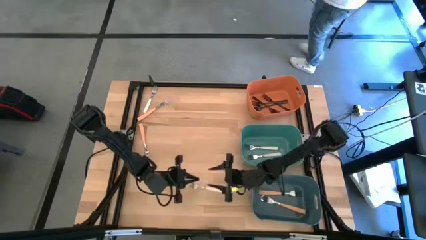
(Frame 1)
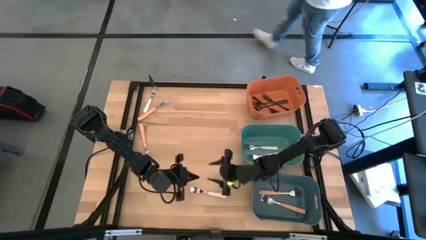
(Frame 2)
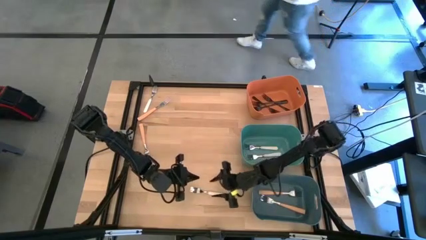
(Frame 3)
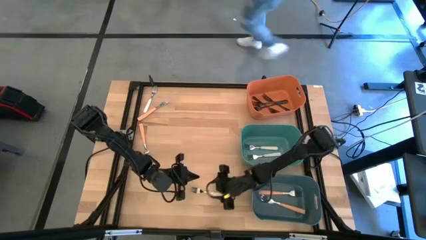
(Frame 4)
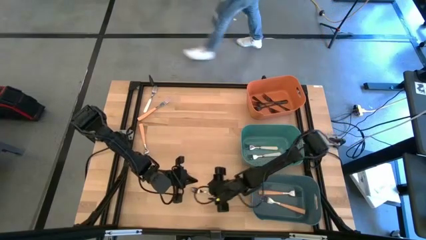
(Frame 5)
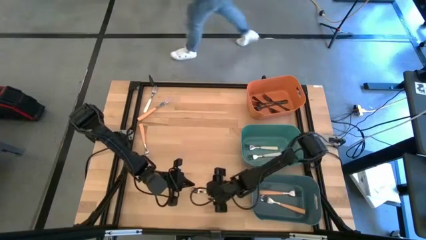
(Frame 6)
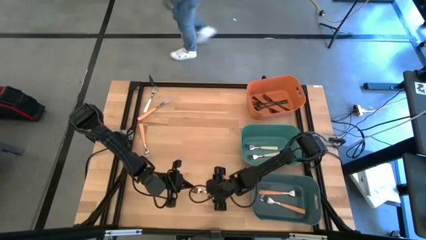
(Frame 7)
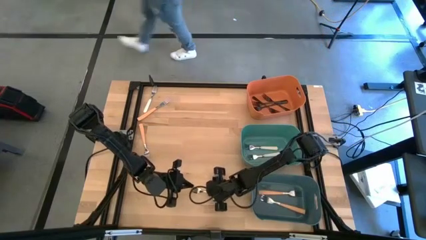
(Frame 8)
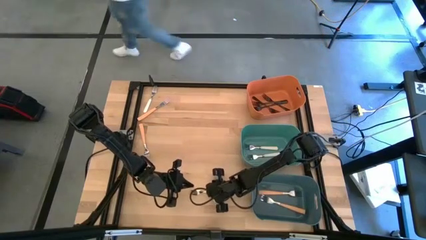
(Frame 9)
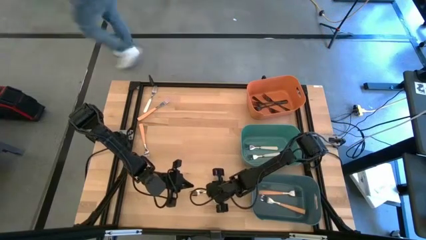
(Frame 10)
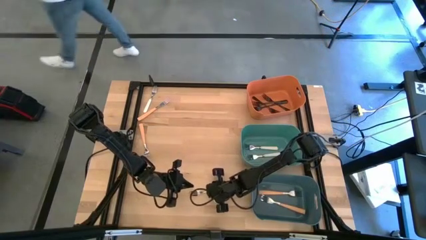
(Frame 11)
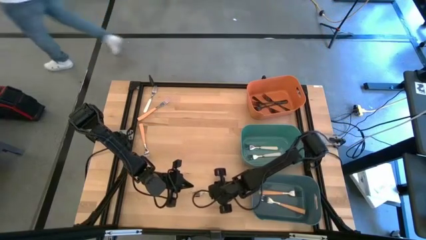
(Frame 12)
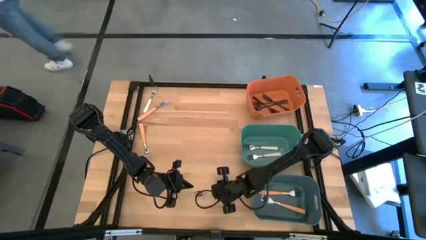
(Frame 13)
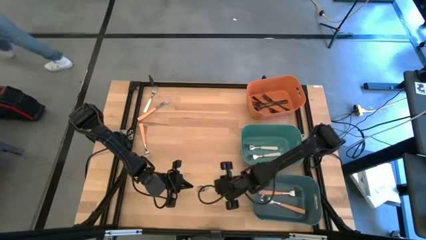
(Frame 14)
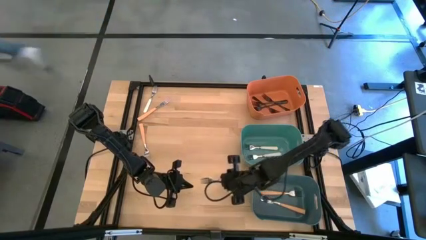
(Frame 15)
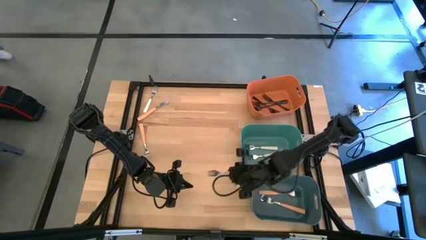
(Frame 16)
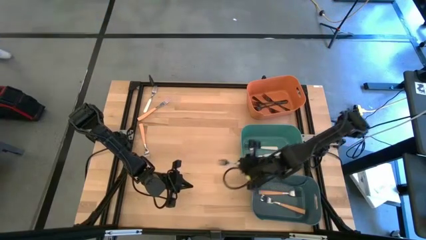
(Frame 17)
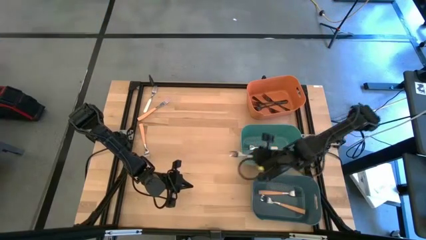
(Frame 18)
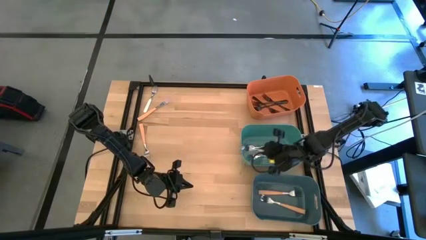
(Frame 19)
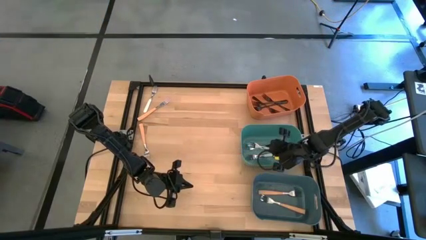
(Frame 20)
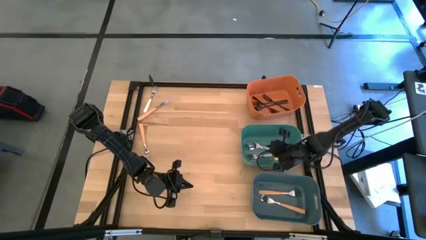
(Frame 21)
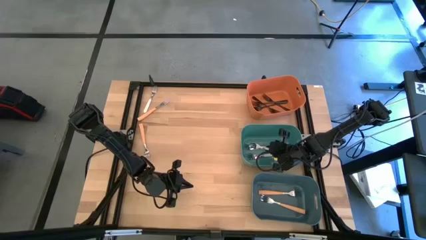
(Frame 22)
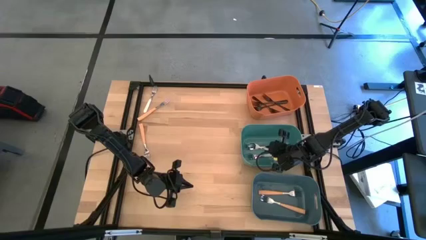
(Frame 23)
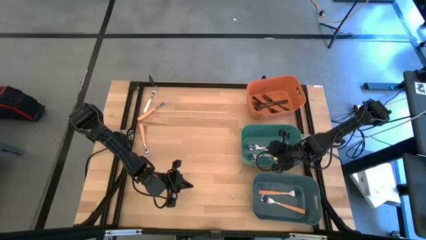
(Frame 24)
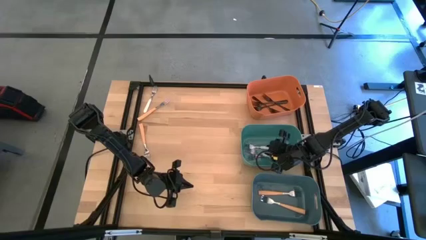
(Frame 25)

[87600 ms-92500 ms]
Task: Sort silverware by color (type)
Put the white fork into the green bin

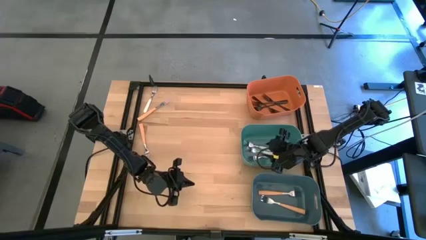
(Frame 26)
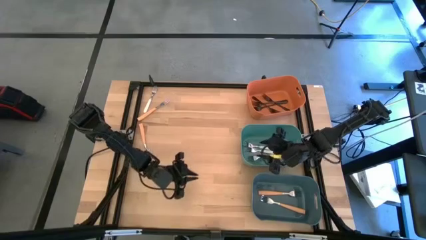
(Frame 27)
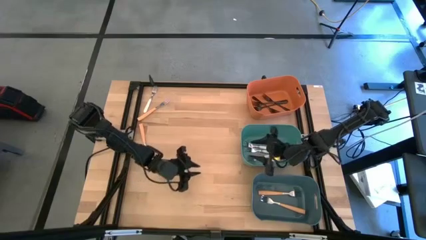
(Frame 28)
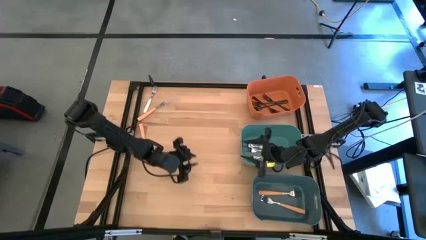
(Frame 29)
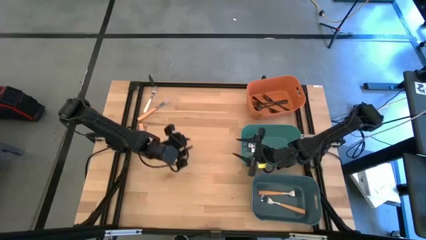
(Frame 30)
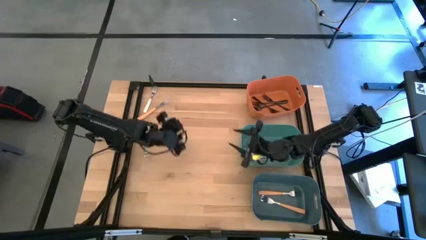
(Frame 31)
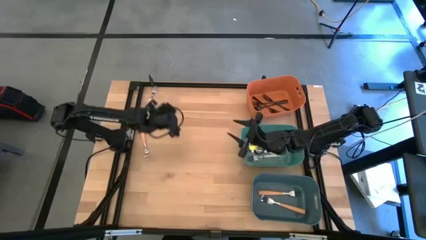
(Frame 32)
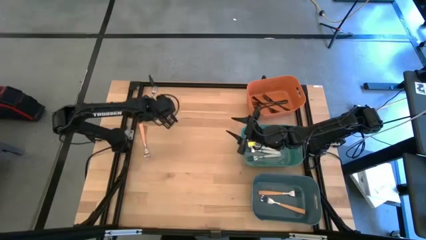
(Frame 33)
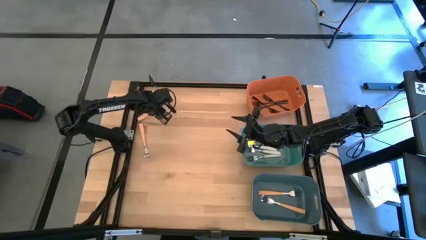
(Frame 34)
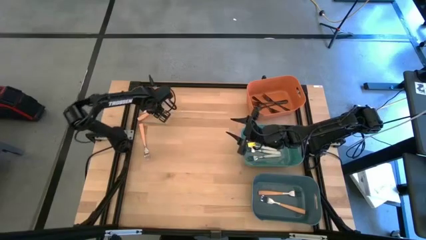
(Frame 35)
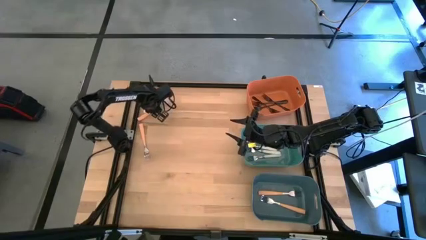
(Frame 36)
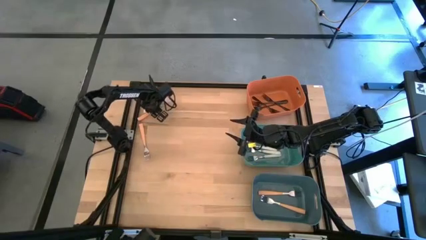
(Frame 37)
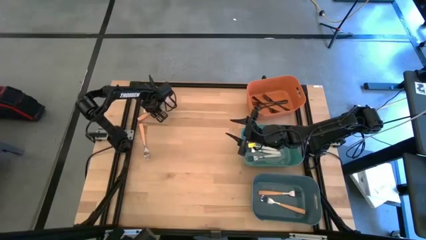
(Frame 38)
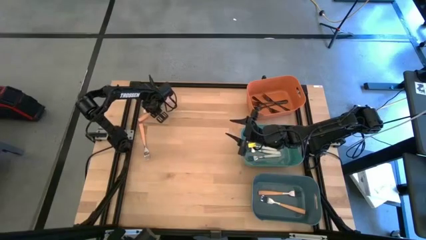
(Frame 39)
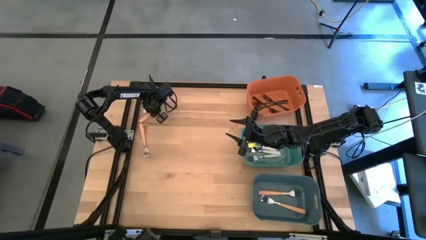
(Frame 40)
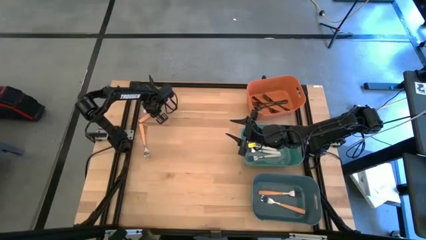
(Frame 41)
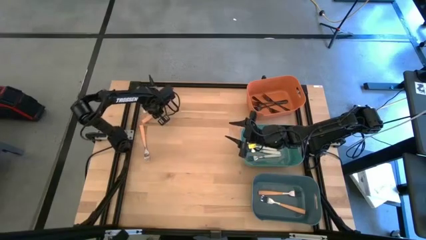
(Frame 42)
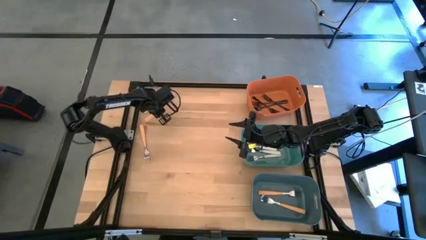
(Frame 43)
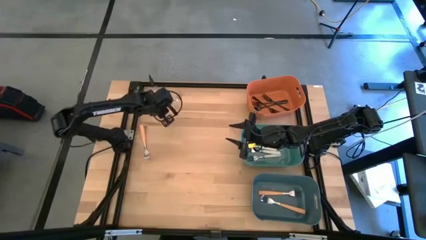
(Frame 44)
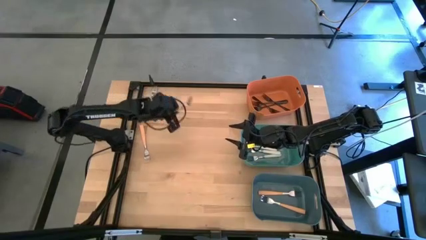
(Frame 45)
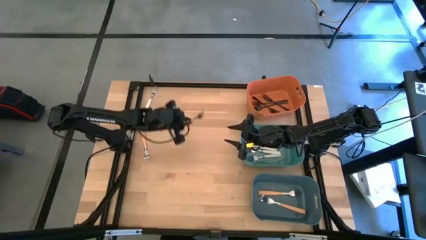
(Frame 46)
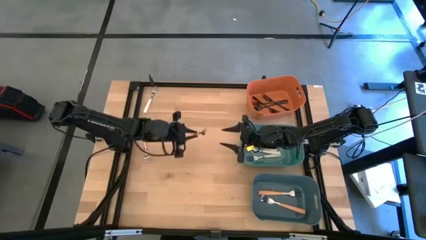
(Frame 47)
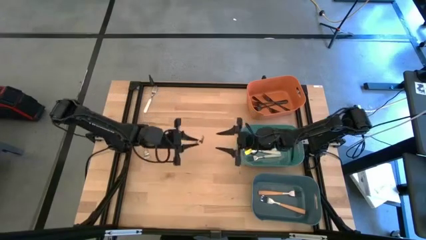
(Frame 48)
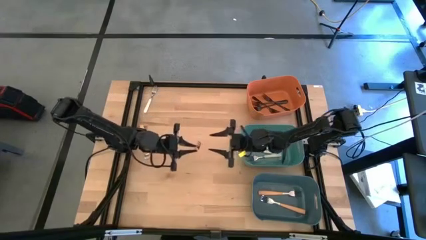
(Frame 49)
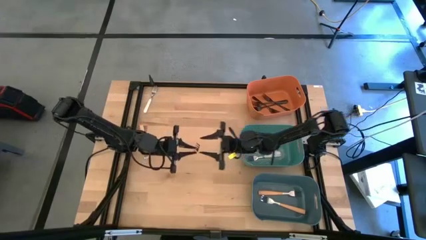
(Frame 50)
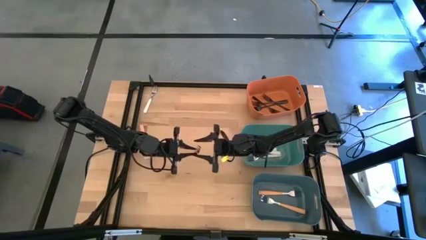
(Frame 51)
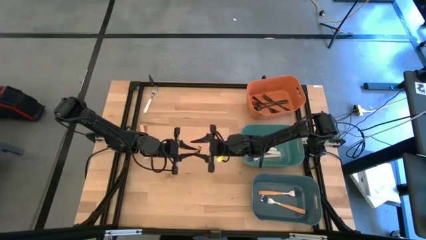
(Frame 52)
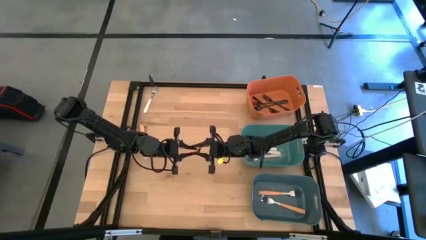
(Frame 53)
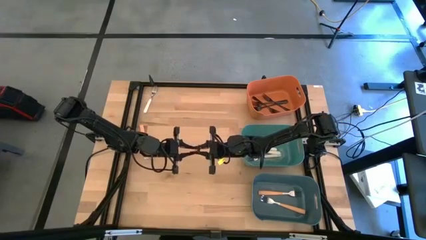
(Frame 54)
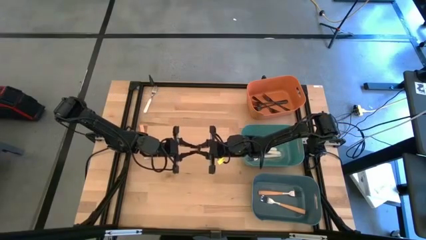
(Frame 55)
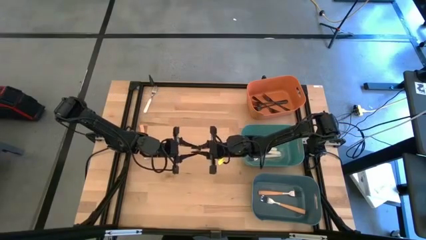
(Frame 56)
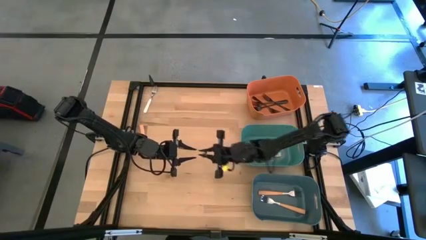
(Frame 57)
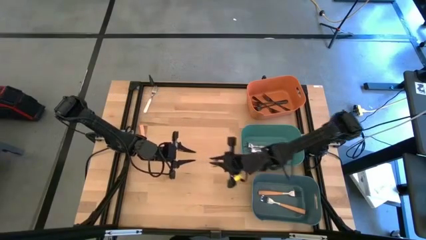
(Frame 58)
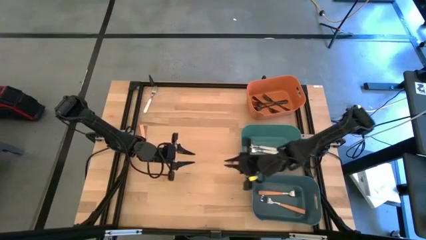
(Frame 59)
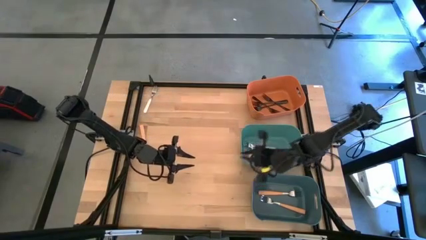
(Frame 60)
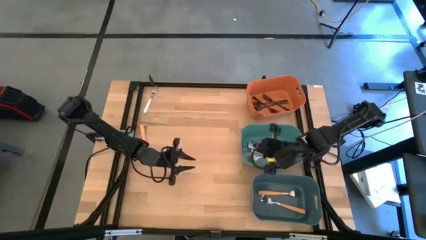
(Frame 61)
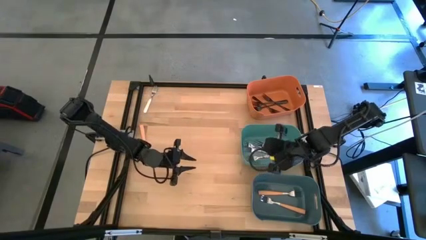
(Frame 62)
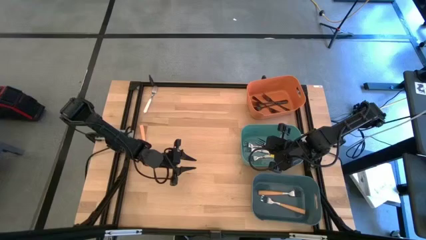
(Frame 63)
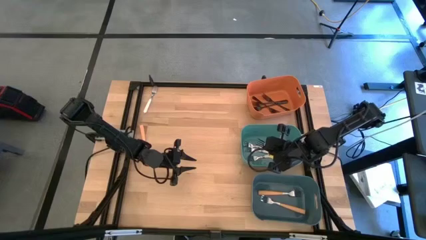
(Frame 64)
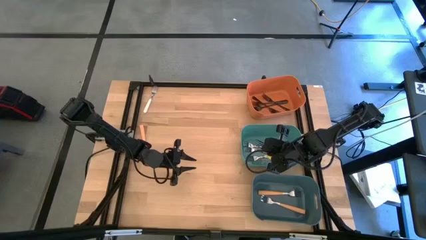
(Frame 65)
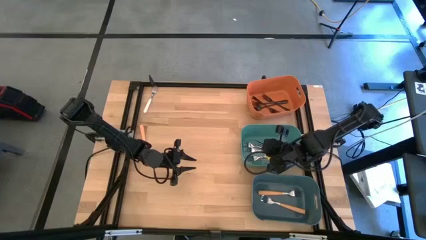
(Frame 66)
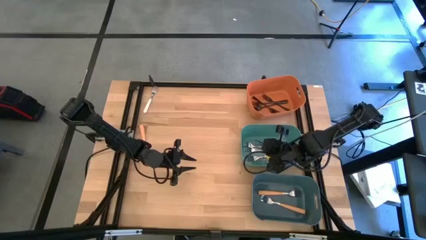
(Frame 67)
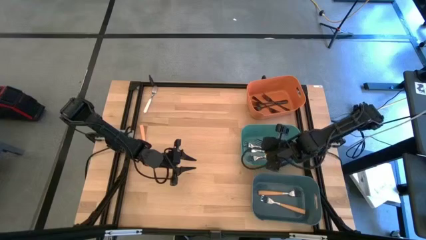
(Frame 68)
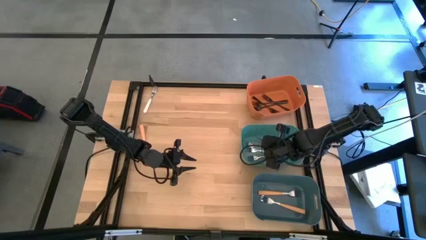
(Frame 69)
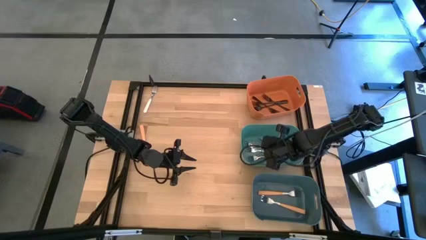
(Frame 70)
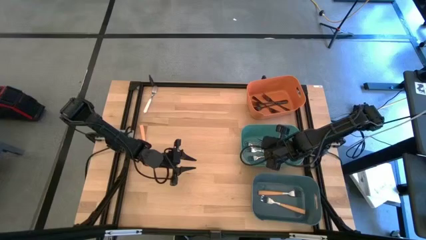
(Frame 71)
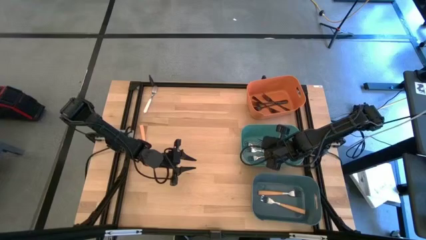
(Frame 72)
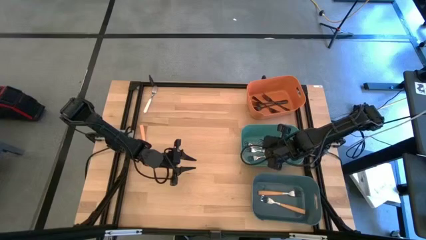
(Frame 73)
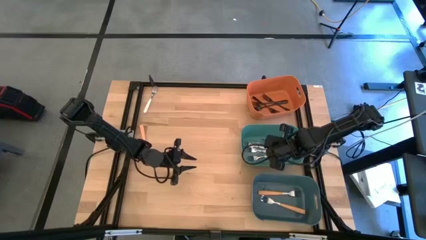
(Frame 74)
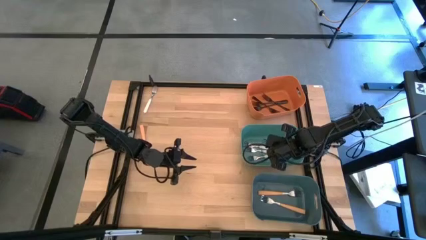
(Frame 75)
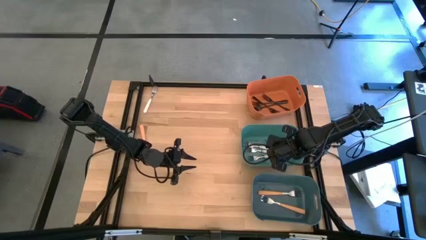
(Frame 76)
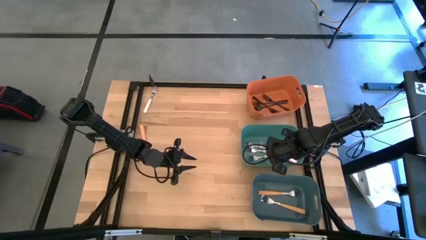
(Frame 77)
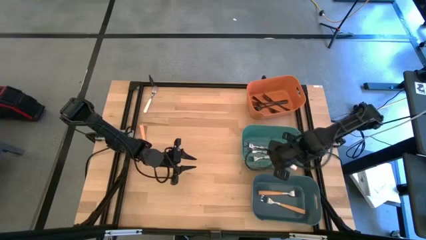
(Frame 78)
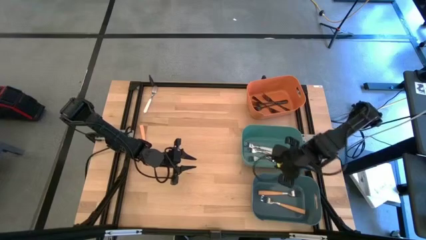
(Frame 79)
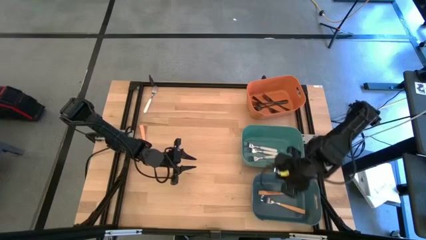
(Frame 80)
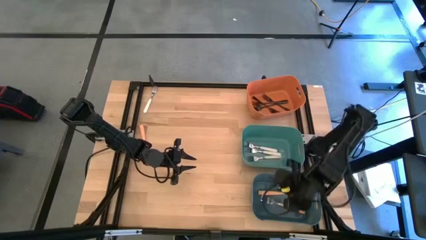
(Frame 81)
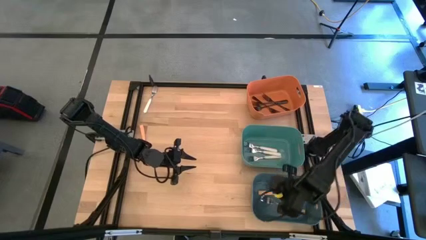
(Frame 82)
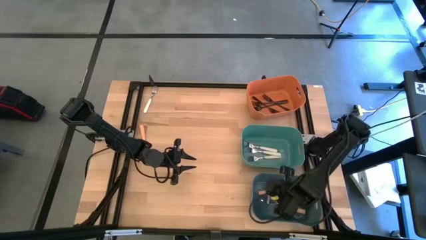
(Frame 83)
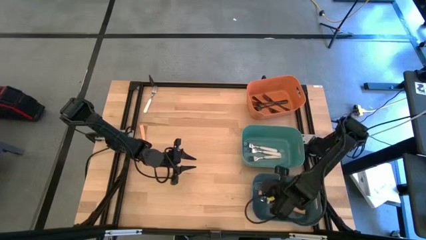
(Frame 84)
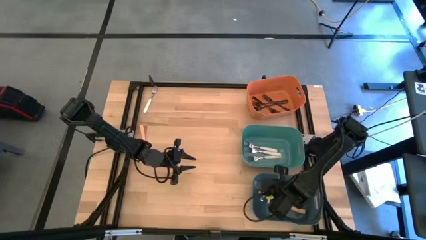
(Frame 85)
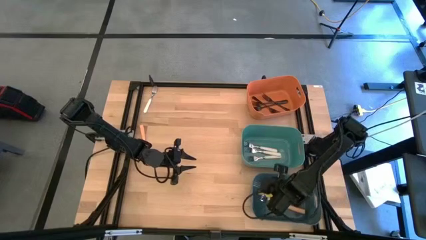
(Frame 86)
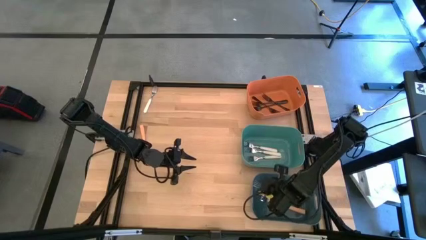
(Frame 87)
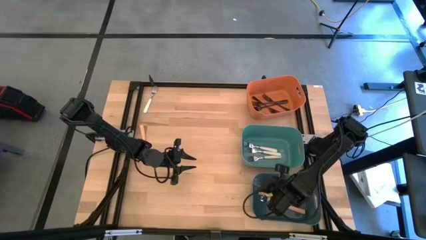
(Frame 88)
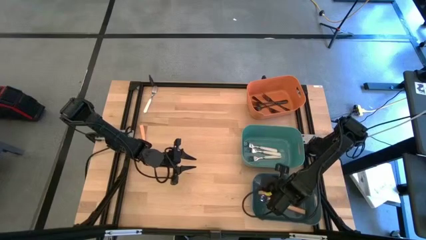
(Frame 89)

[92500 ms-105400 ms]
Put the orange fork into the dark blue bin
